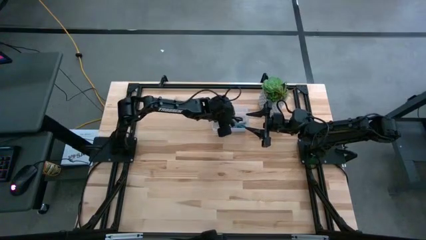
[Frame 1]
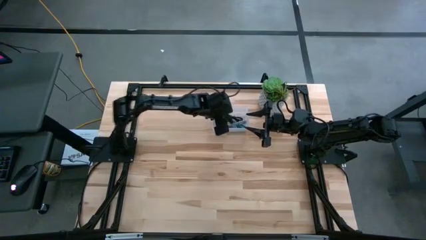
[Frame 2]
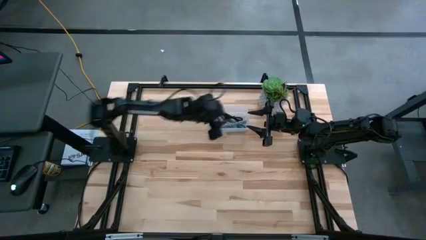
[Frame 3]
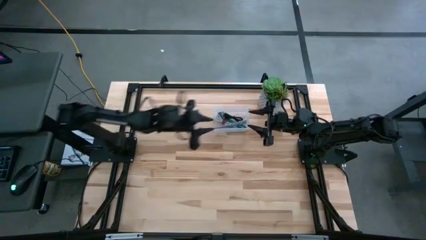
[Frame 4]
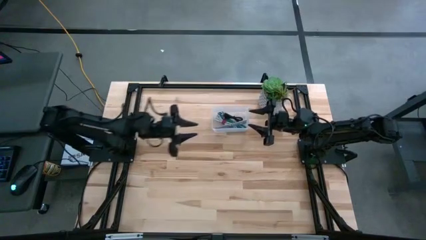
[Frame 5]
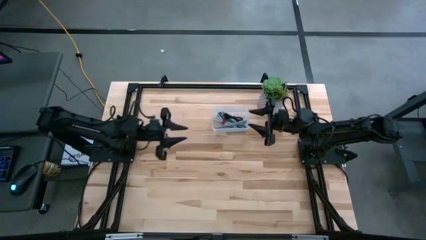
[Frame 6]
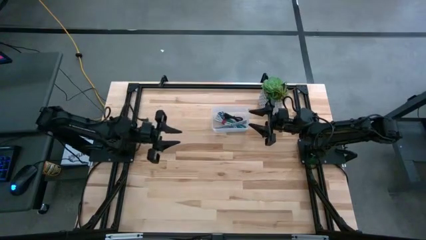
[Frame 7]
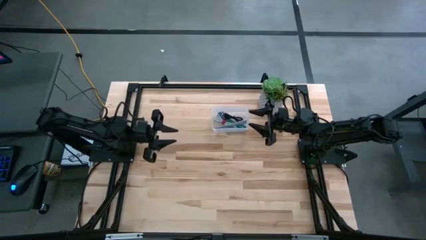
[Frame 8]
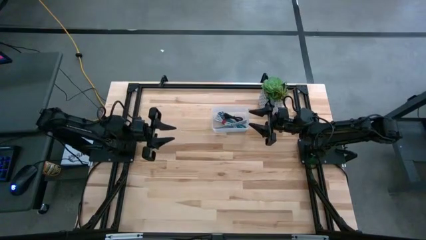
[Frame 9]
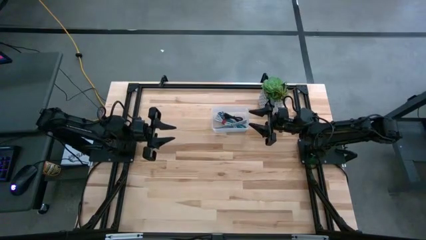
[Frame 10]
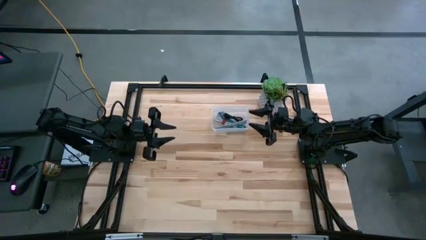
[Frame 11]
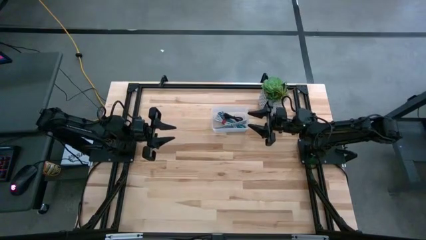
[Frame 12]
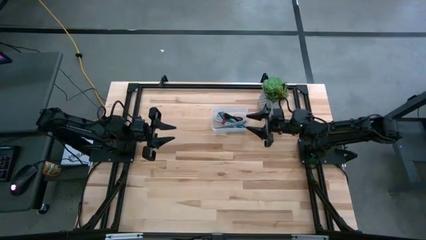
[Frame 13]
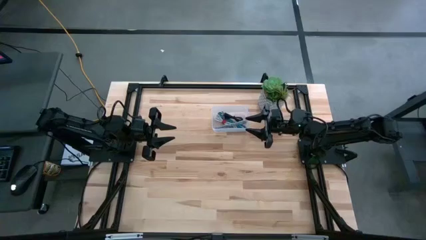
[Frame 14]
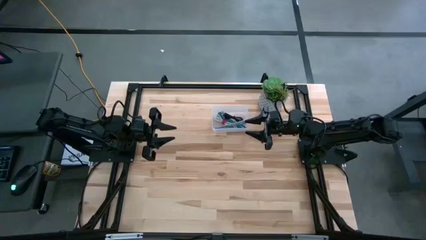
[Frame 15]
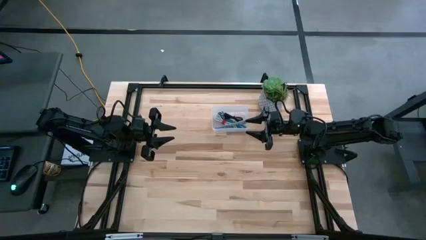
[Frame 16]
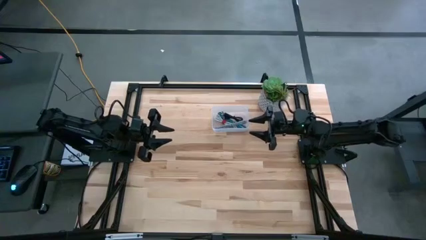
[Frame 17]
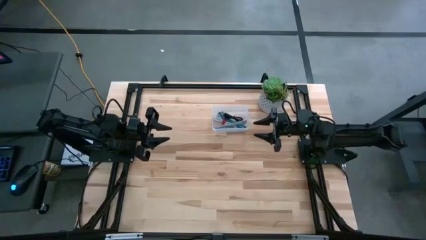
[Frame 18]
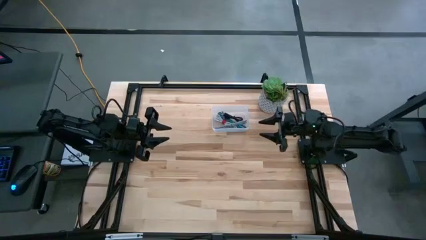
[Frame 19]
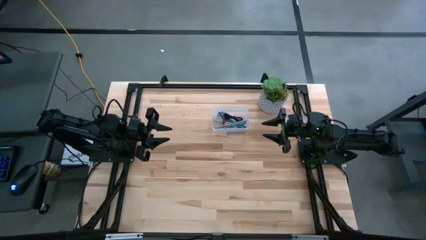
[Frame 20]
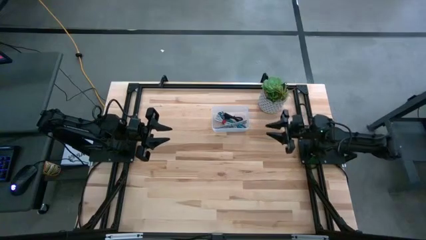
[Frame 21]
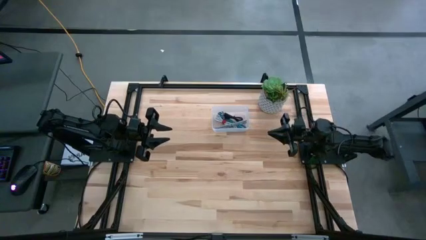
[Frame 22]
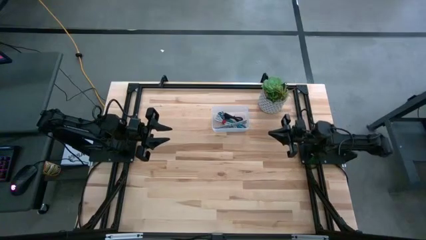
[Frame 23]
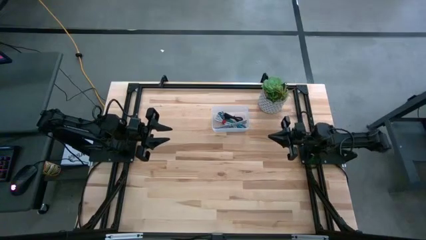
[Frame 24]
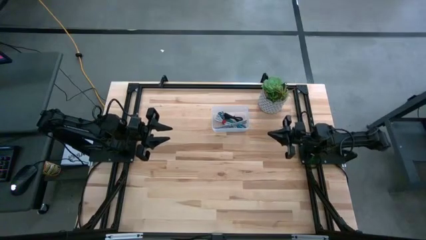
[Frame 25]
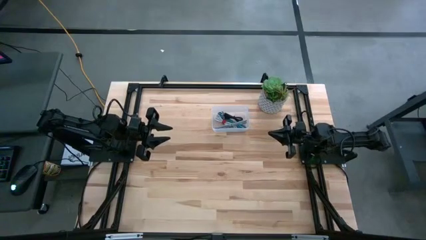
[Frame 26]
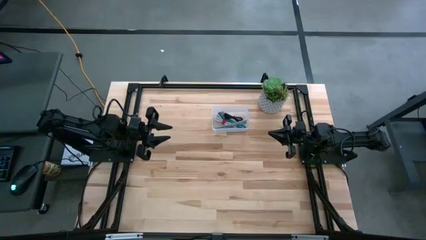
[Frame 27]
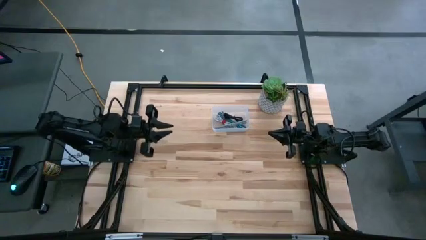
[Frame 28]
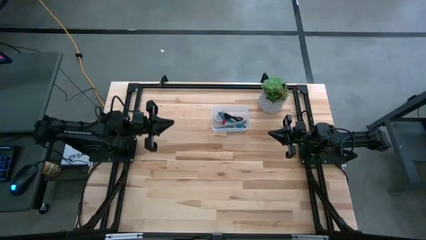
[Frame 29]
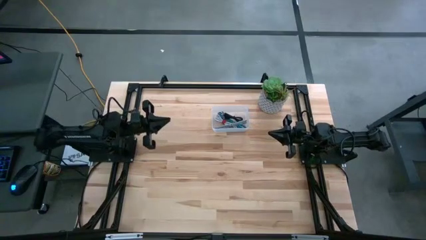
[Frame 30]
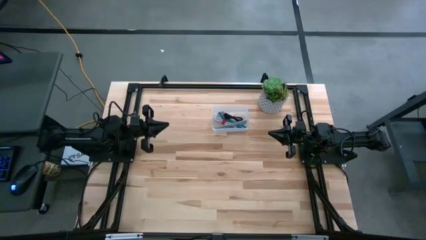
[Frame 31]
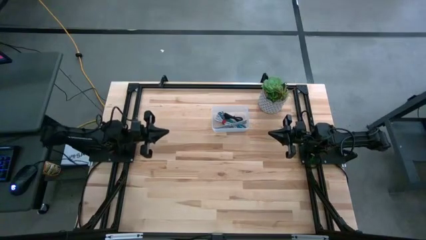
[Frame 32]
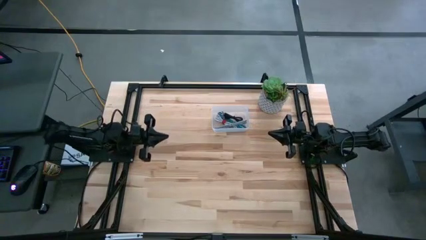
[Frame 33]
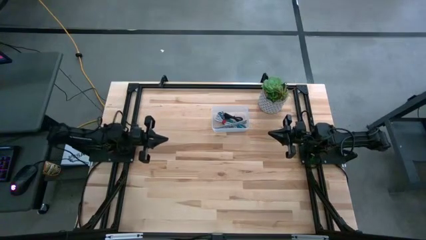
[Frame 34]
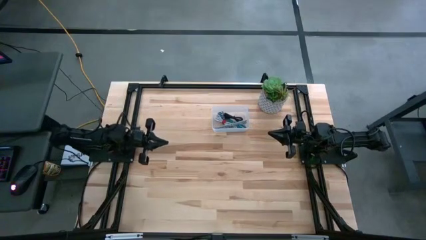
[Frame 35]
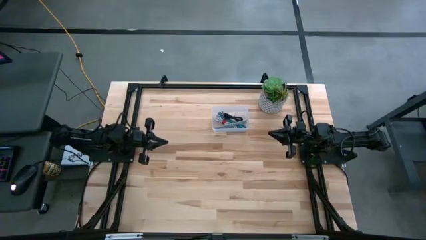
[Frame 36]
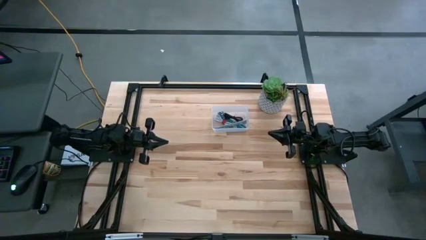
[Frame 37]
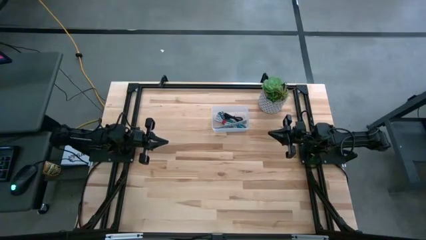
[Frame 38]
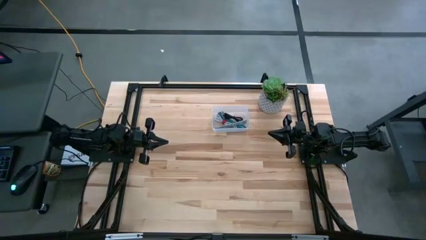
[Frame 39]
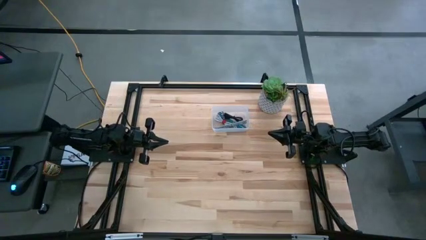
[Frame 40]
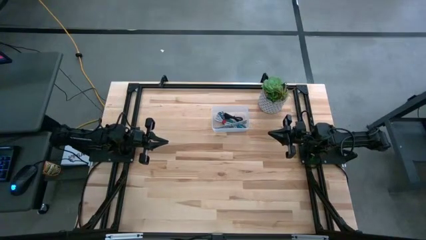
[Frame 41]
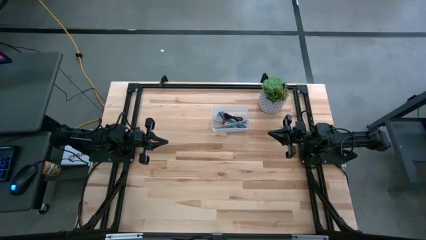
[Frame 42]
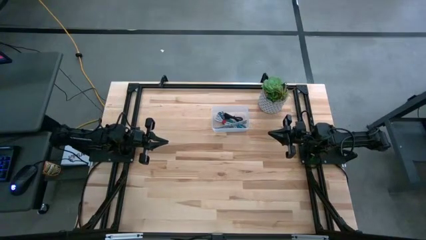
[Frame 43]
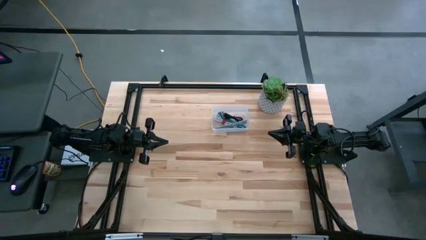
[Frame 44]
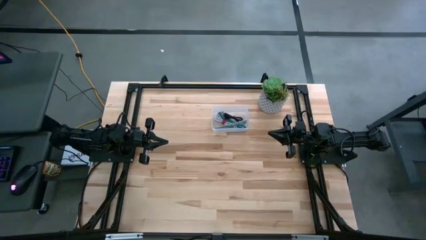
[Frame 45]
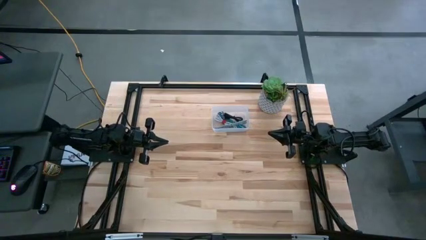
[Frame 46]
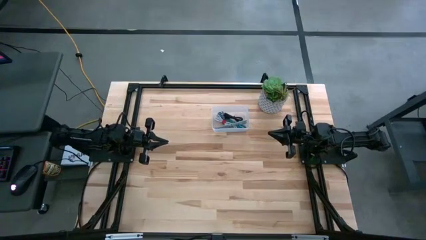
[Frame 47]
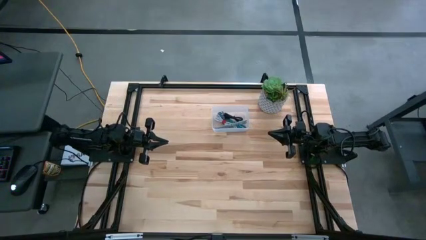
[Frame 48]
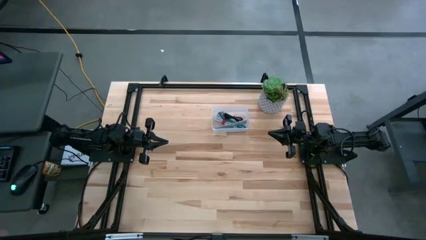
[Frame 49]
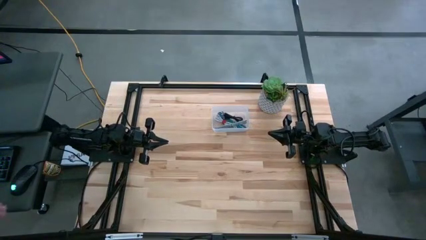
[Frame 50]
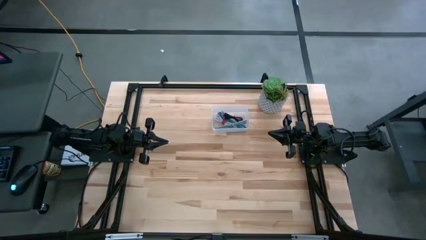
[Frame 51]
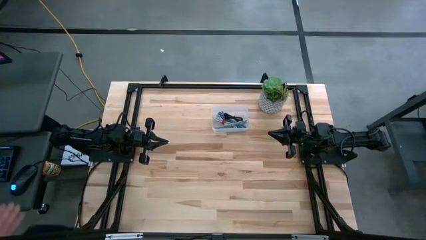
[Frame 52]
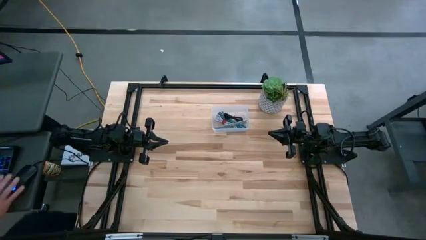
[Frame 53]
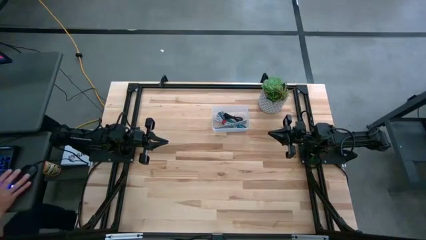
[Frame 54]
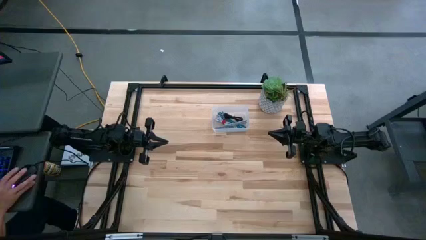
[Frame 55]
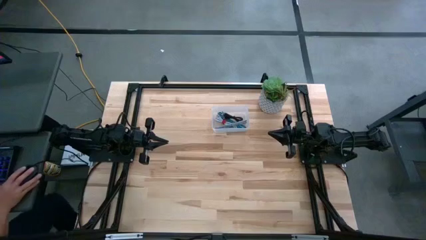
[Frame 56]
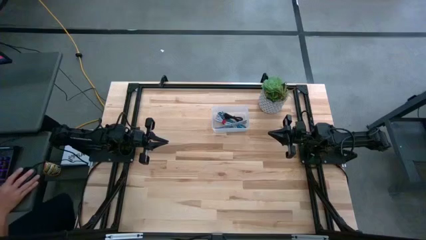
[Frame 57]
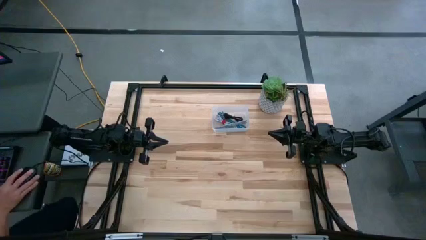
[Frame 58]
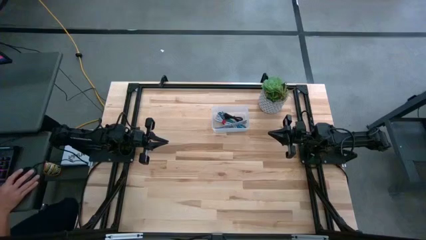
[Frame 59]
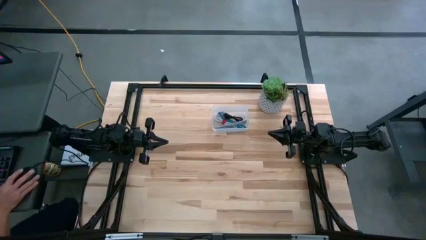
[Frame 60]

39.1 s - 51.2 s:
Task: Pick and place USB-C Cables
Return to Home Position

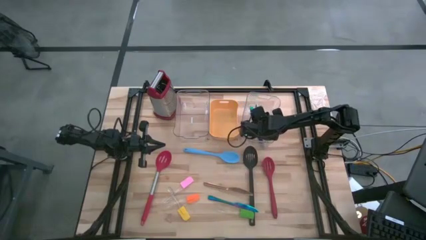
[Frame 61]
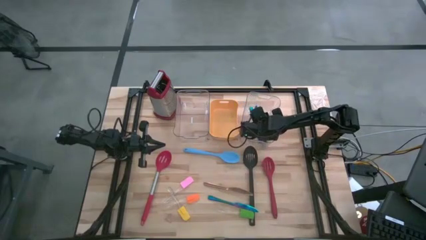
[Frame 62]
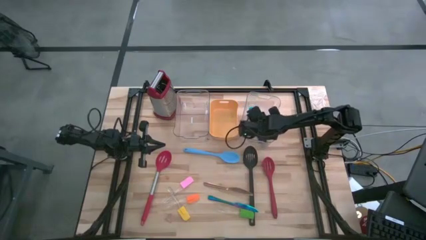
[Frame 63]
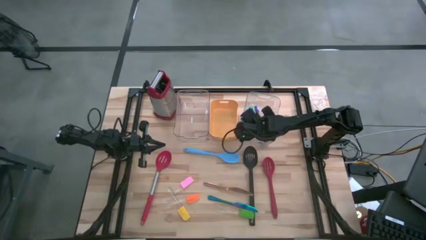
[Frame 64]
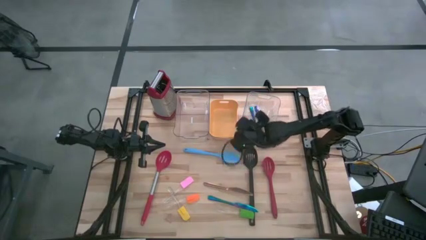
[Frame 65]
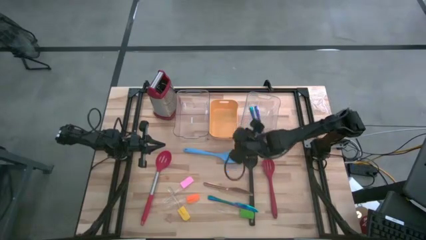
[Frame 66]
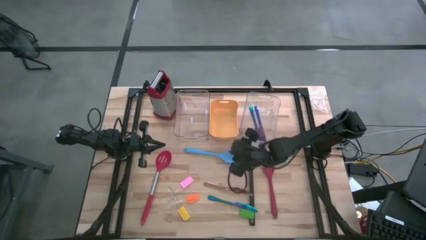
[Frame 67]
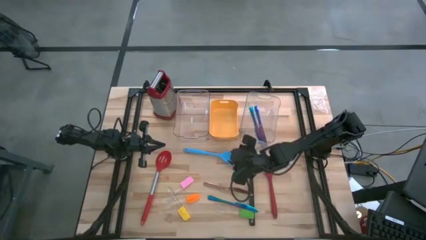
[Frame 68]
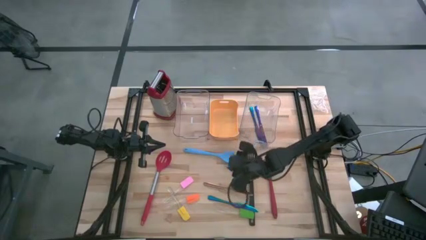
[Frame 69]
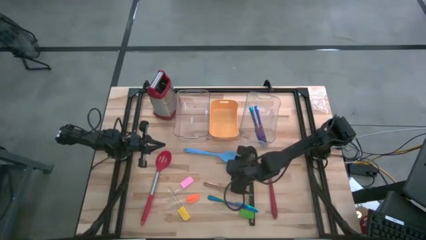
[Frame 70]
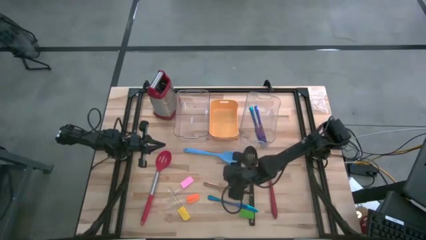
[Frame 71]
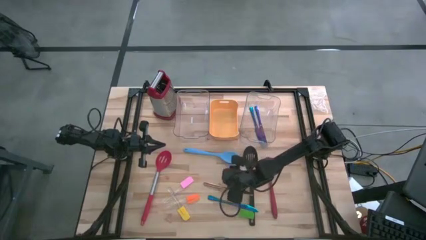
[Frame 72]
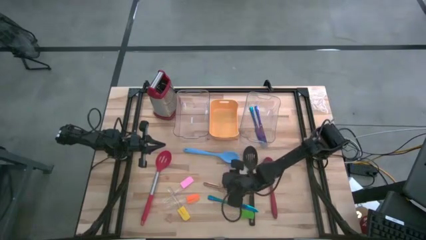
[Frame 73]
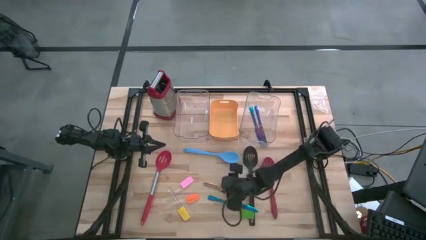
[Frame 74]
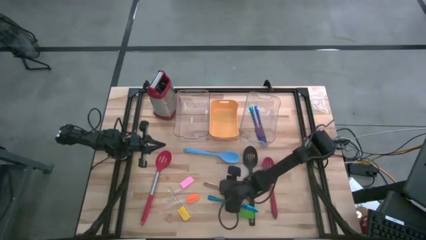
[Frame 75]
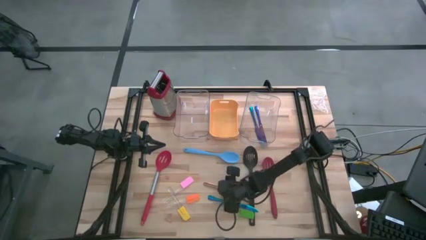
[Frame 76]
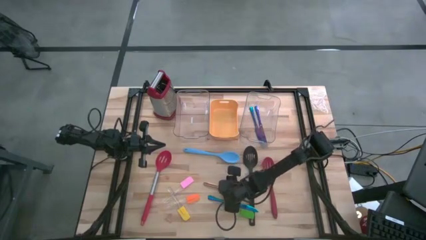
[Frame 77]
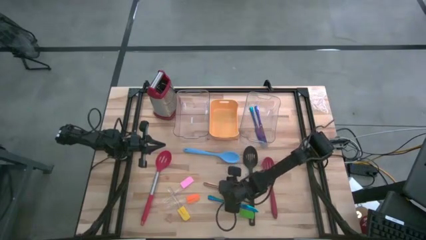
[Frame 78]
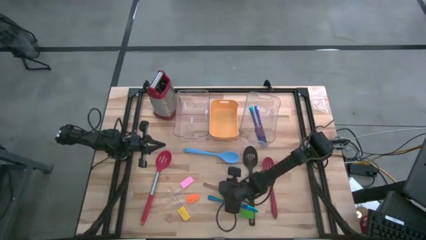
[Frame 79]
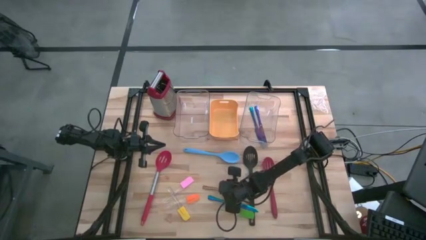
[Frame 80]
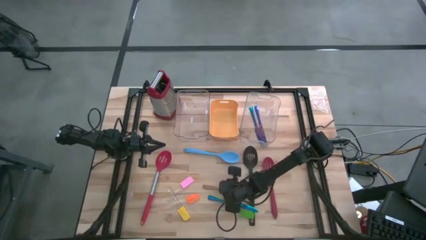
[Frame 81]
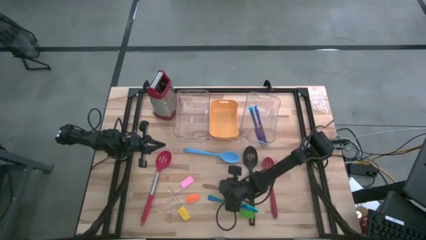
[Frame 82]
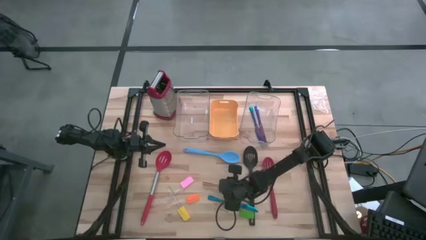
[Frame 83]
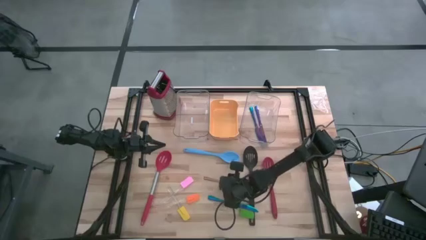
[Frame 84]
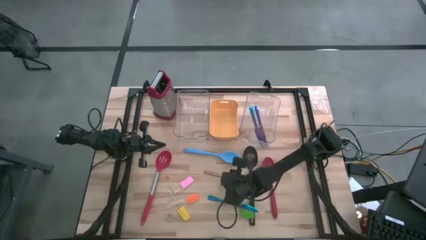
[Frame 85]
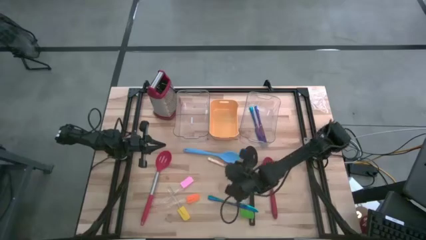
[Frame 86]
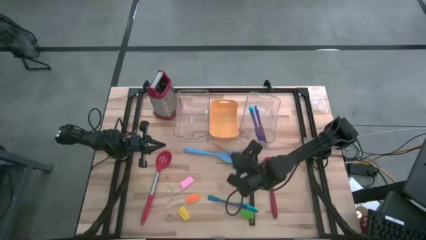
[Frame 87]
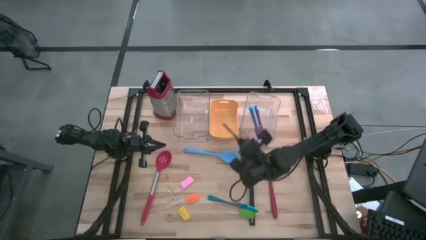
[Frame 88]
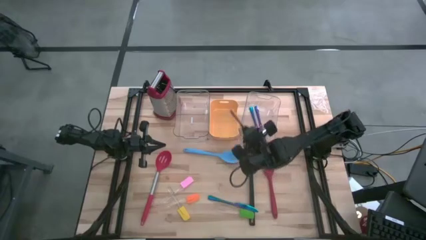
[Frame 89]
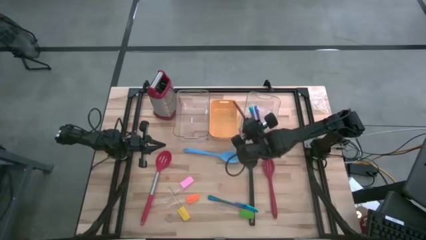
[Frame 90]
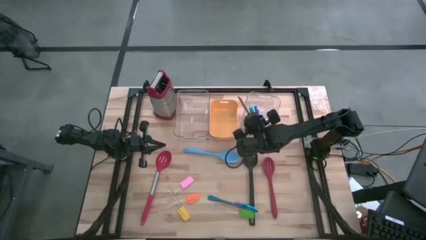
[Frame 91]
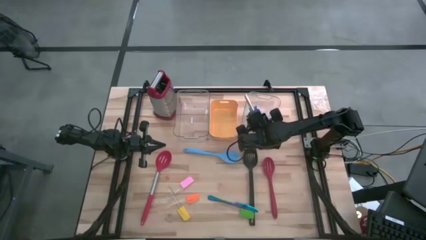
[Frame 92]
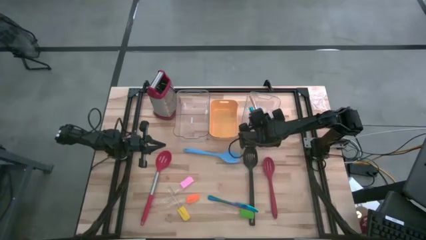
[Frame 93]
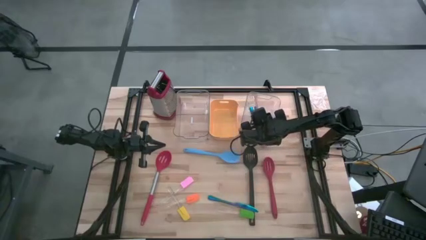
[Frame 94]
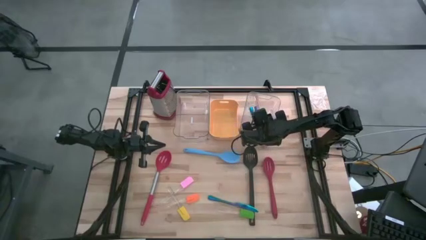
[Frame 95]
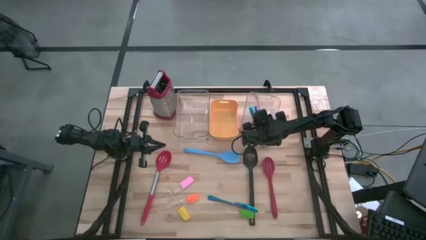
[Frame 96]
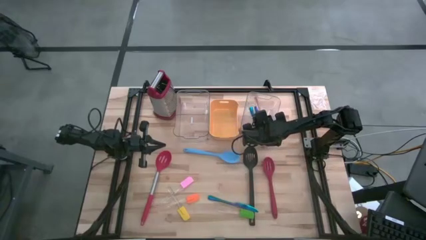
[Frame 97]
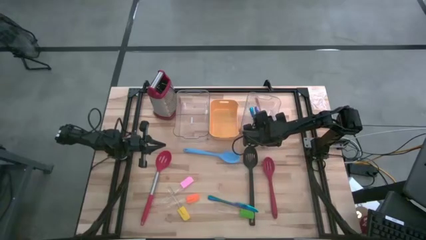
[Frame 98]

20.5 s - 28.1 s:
Task: Pick & Place Kitchen Items
Put the gold knife into the right transparent bin
